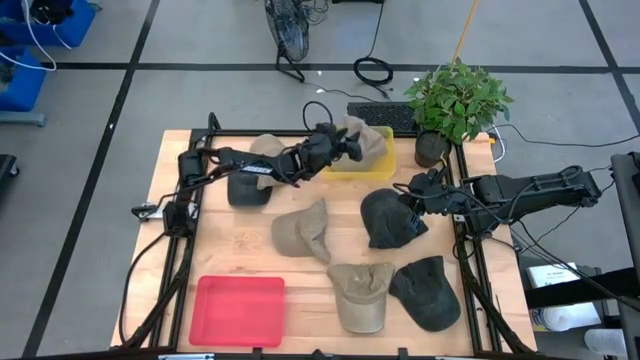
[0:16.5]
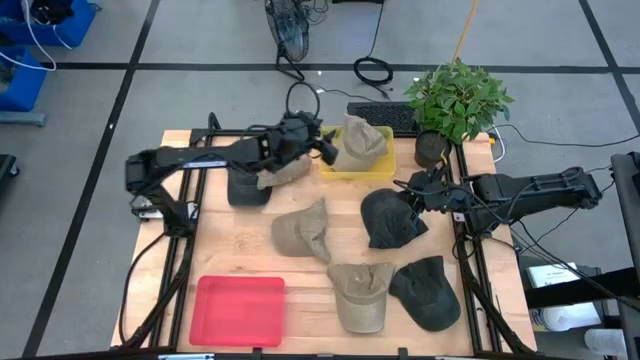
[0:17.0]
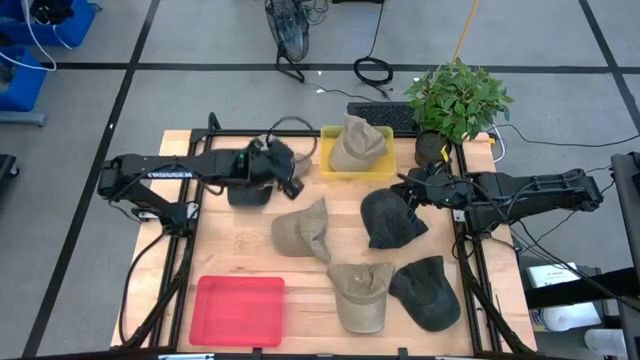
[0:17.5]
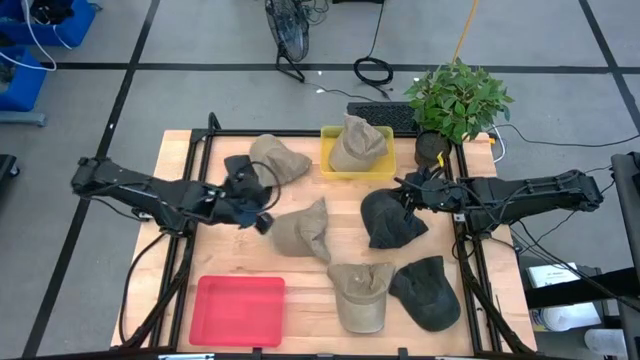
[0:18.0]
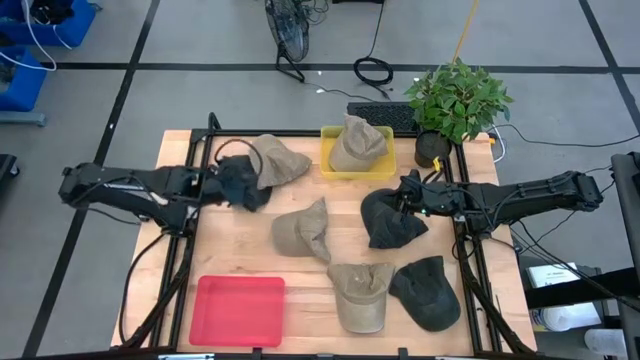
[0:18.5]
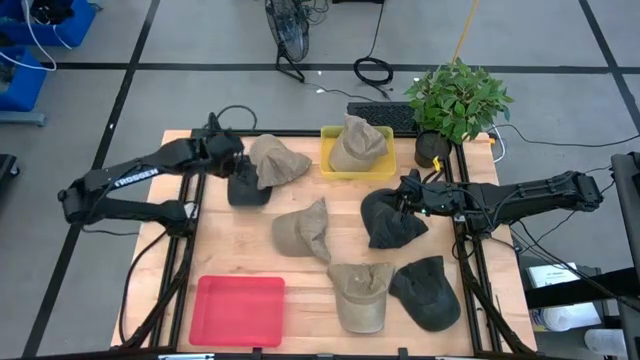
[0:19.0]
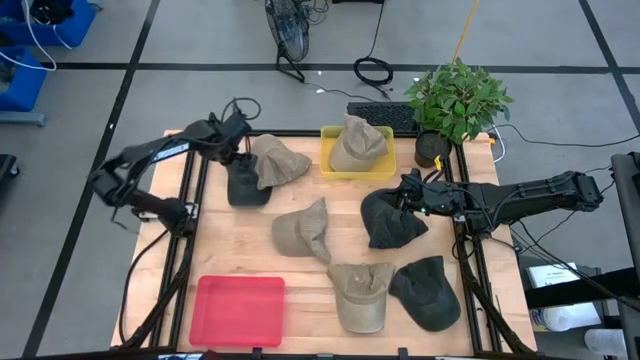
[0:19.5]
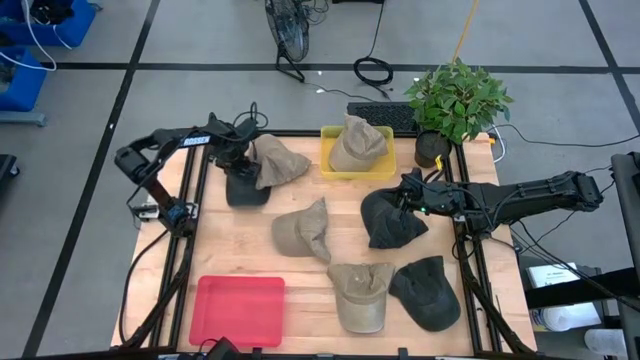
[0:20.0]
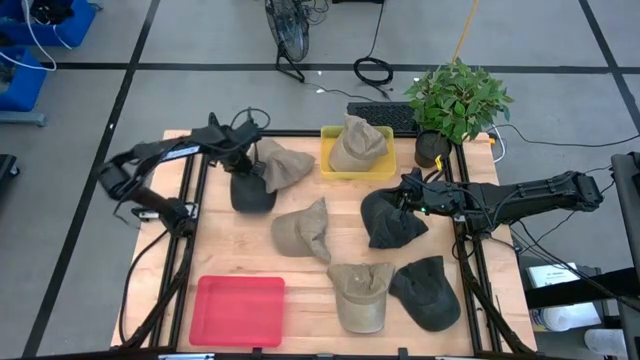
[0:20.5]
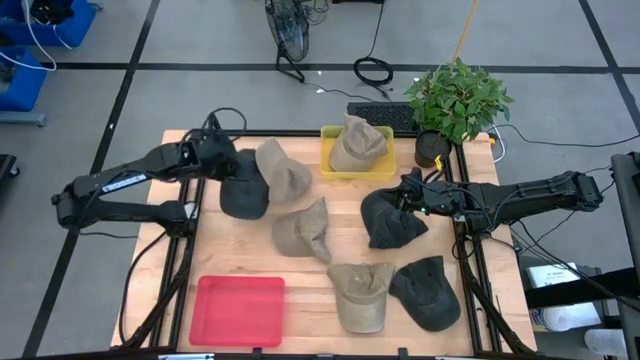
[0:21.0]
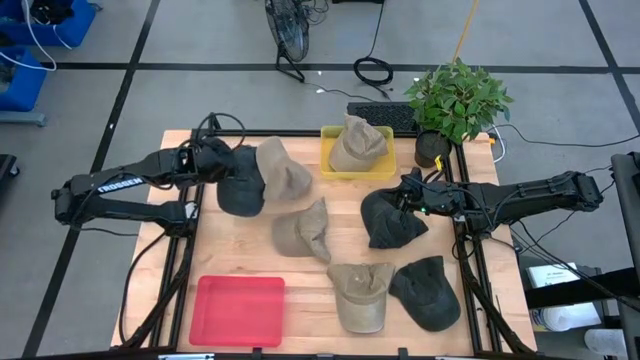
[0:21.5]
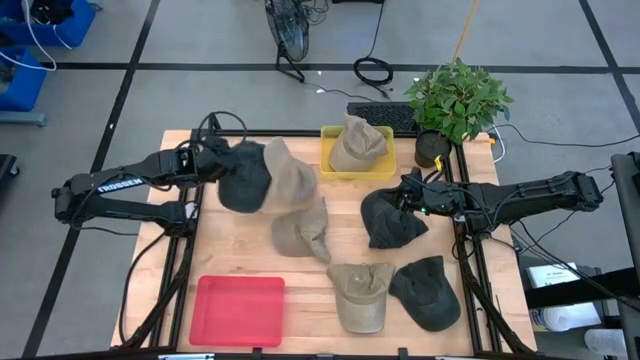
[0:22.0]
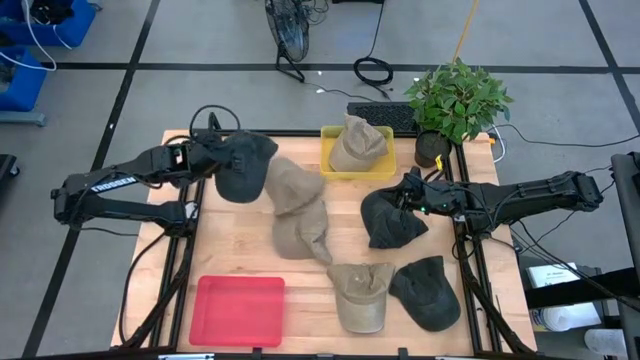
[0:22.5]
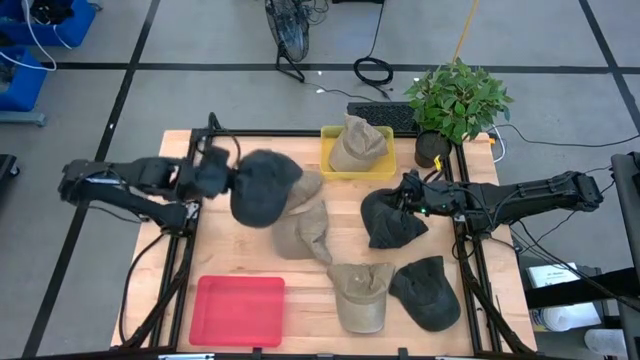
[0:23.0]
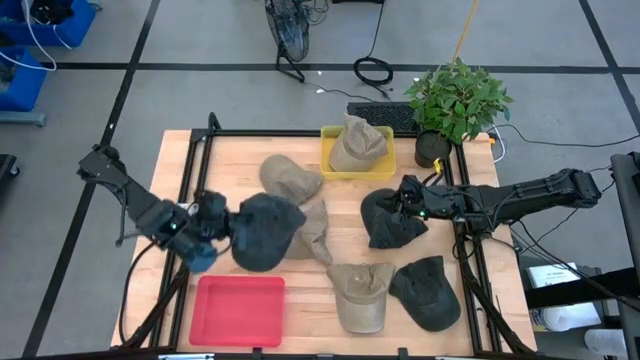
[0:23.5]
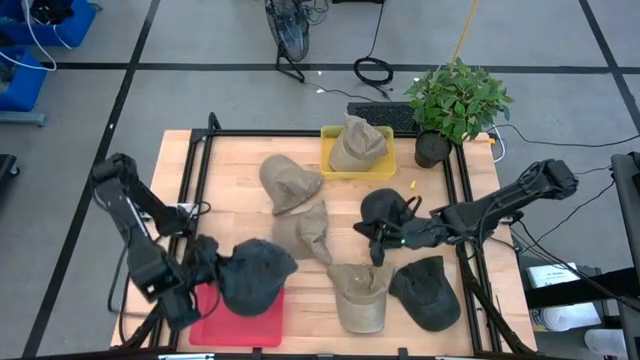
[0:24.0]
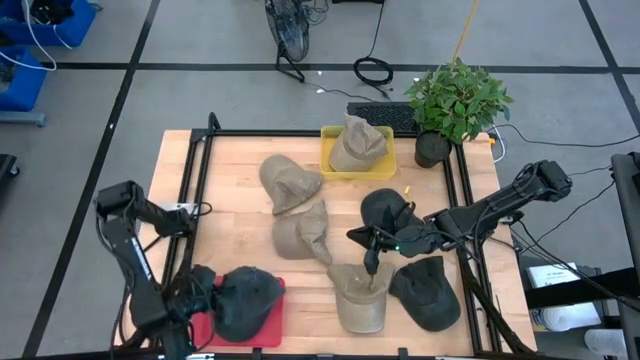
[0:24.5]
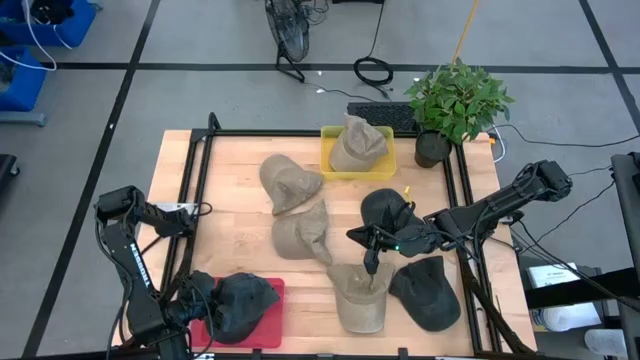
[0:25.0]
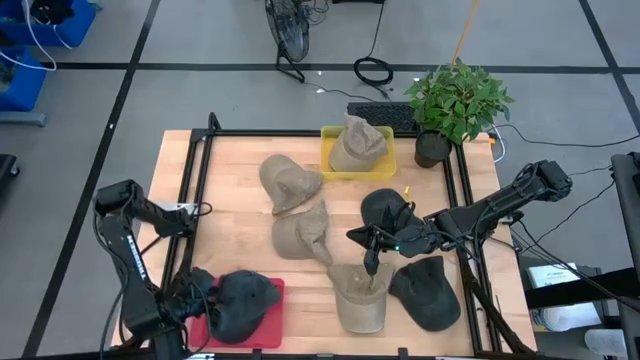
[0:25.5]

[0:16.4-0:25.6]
Task: Pick & Place hat
Put the black cap into the red bin

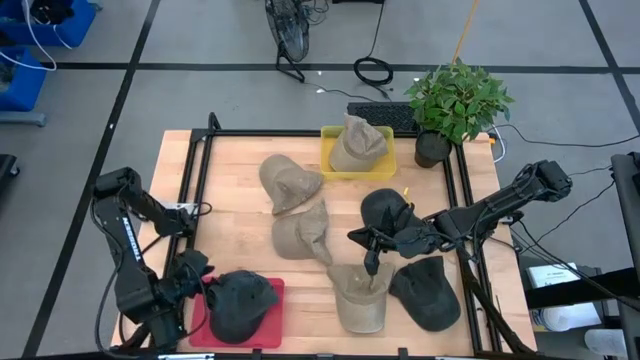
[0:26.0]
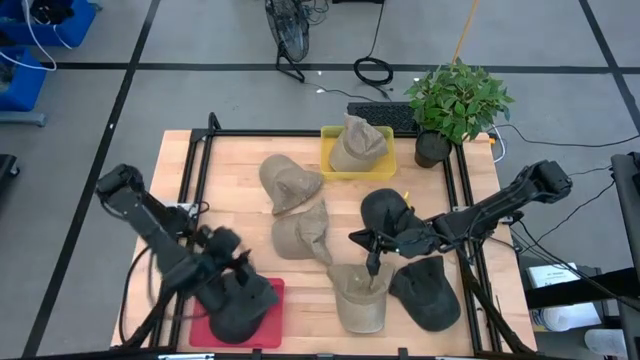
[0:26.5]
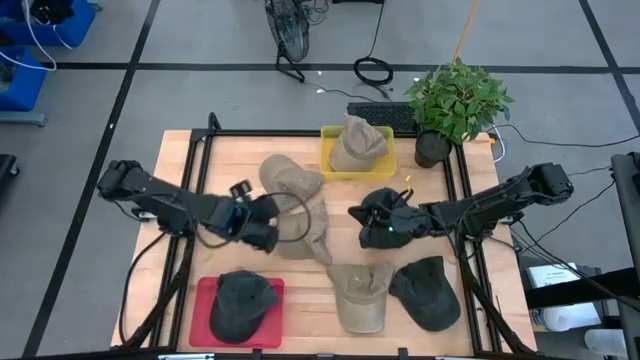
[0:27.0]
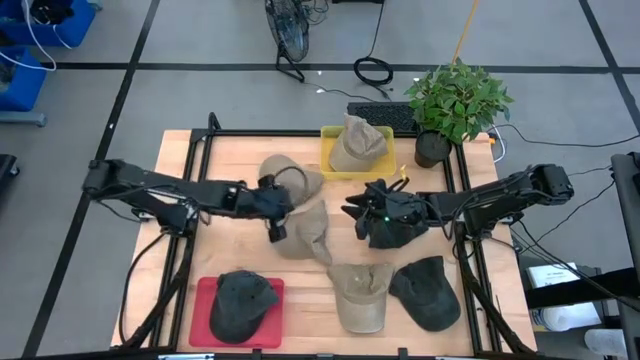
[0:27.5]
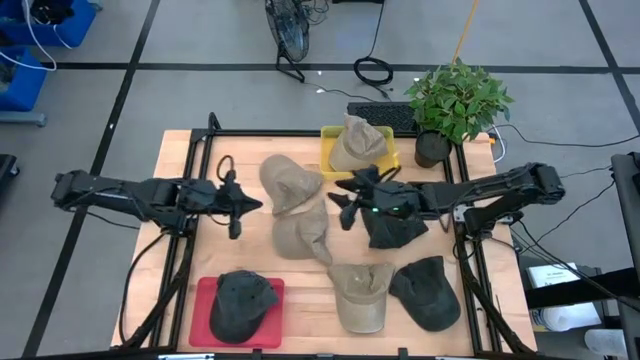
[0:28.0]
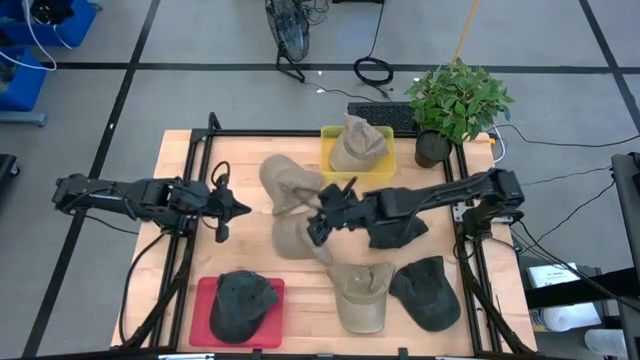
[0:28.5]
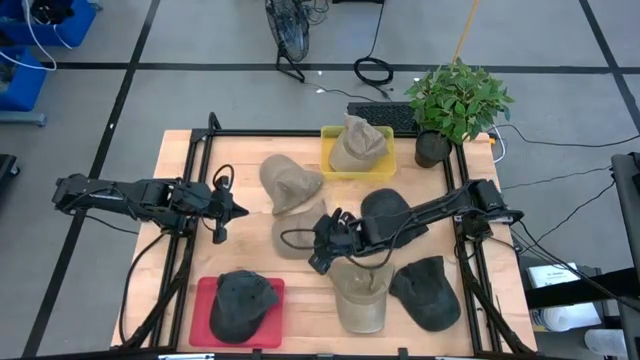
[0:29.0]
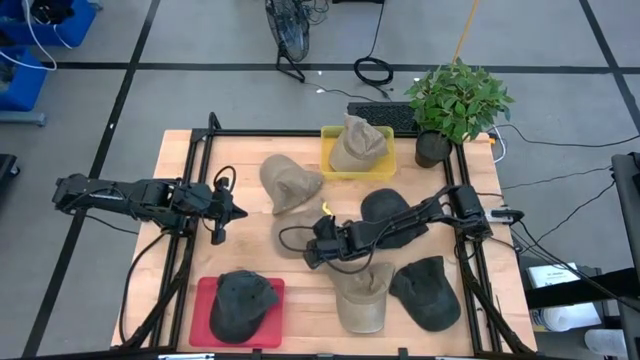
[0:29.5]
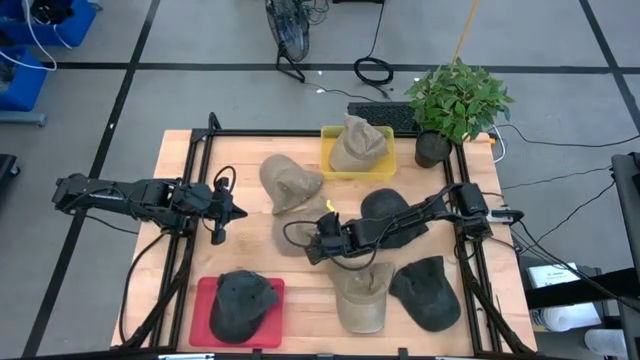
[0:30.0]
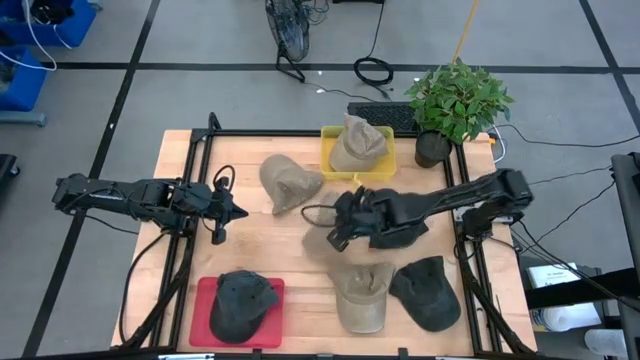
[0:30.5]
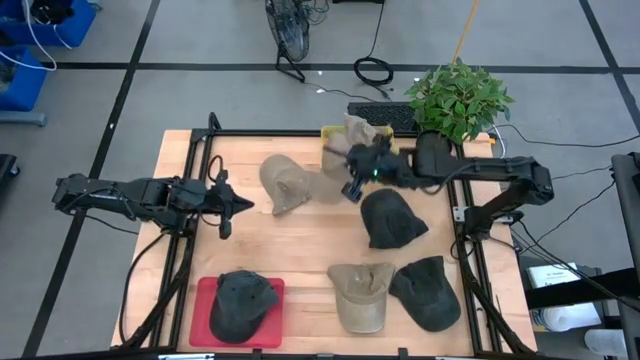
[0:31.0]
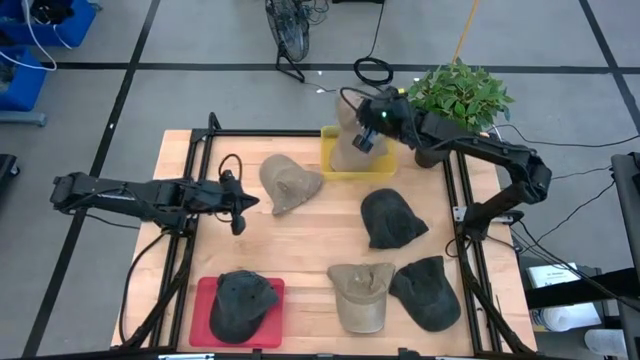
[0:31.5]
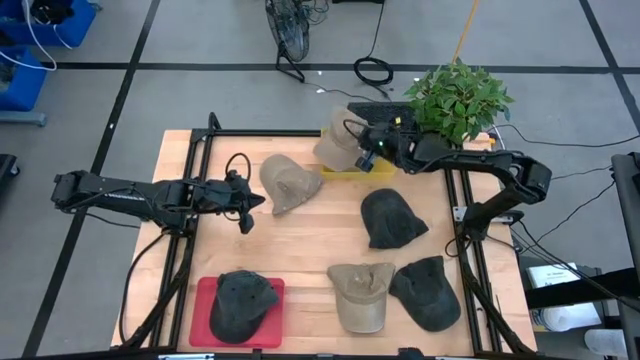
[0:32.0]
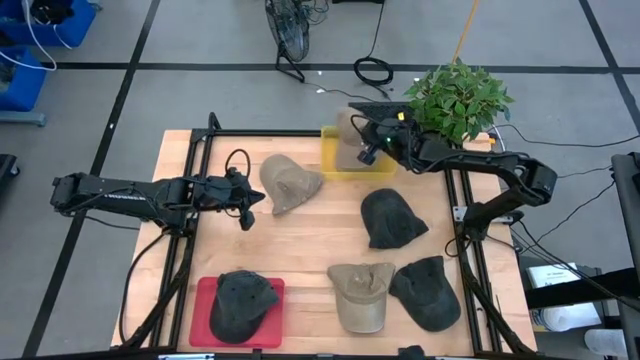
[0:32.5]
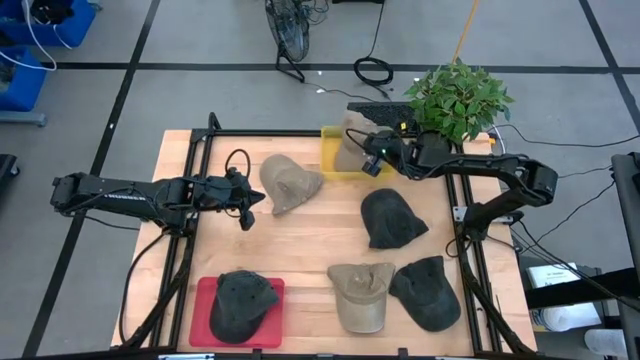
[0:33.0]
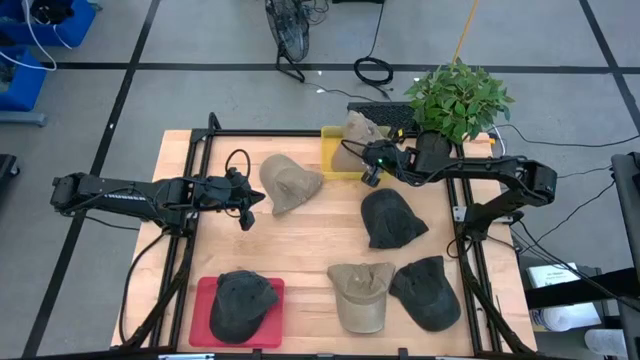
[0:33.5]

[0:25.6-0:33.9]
Put the brown cap into the yellow bin
